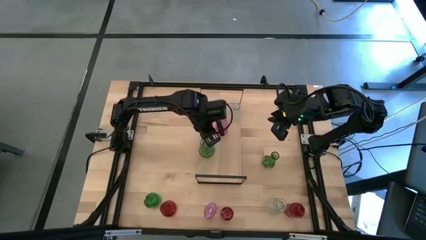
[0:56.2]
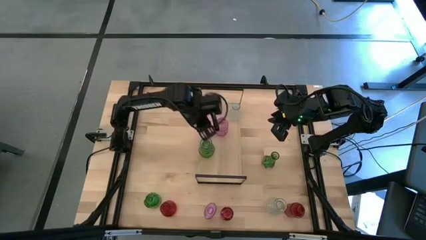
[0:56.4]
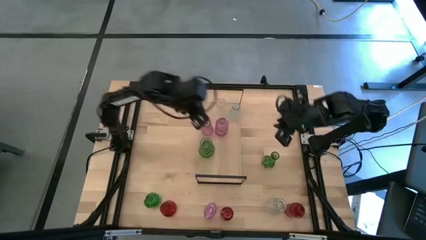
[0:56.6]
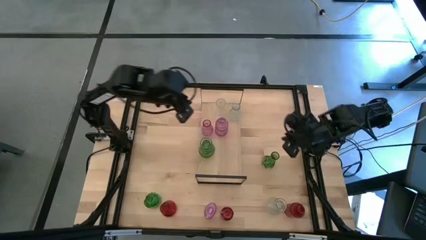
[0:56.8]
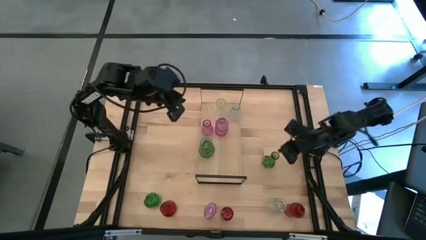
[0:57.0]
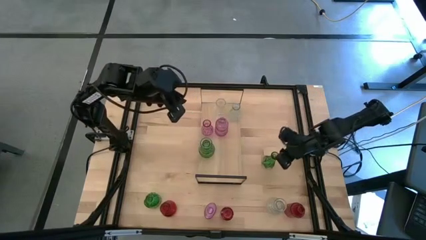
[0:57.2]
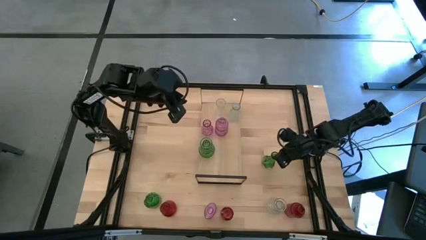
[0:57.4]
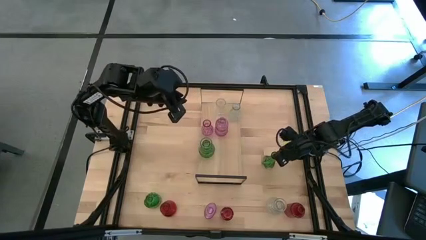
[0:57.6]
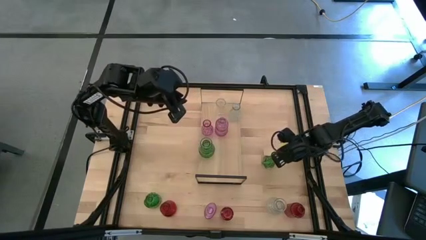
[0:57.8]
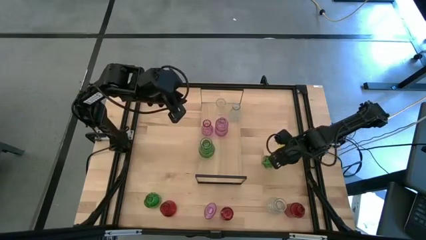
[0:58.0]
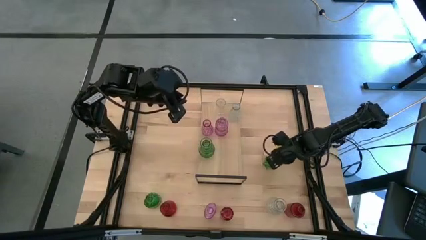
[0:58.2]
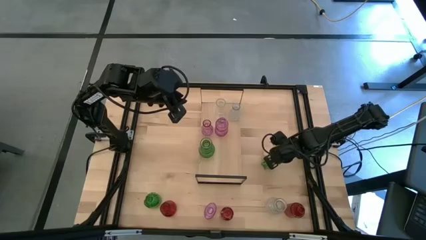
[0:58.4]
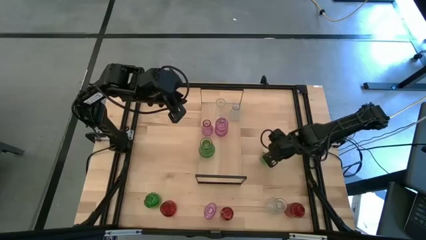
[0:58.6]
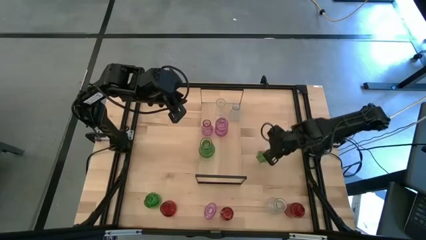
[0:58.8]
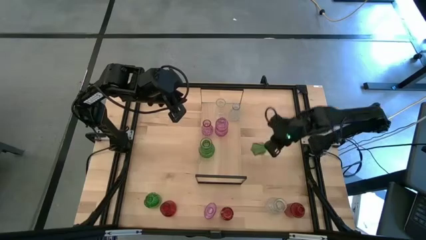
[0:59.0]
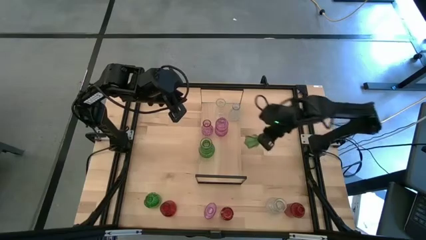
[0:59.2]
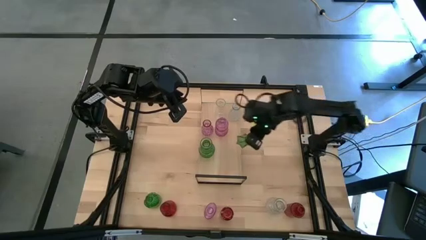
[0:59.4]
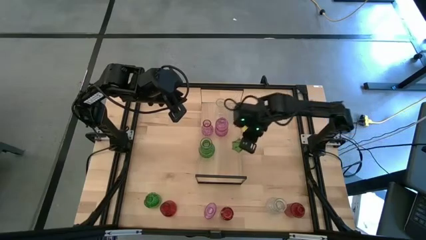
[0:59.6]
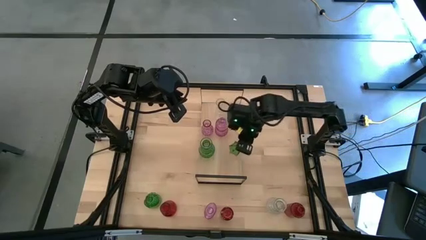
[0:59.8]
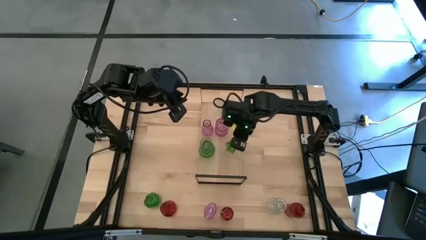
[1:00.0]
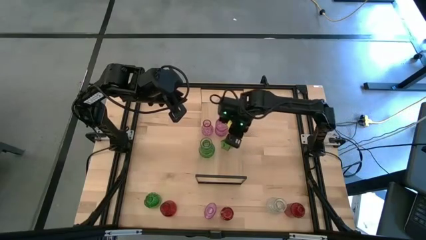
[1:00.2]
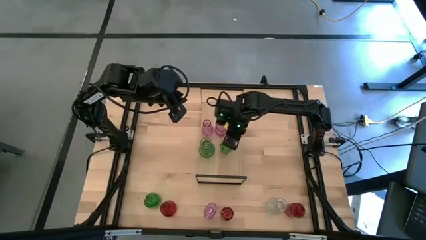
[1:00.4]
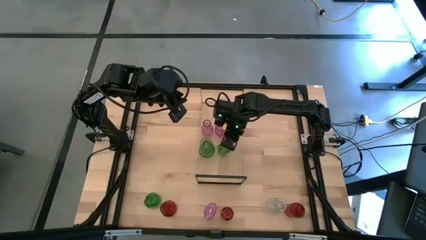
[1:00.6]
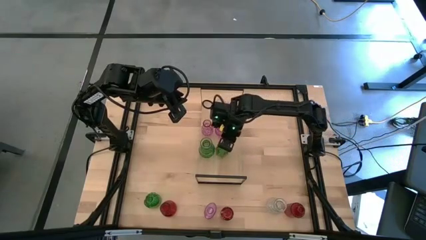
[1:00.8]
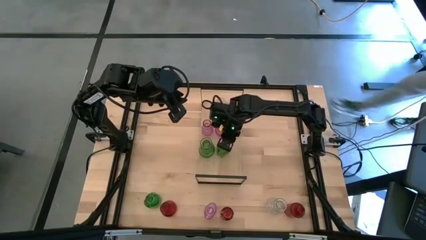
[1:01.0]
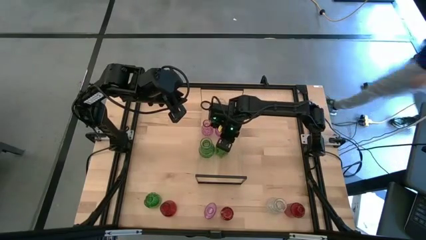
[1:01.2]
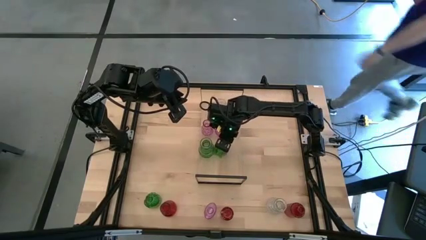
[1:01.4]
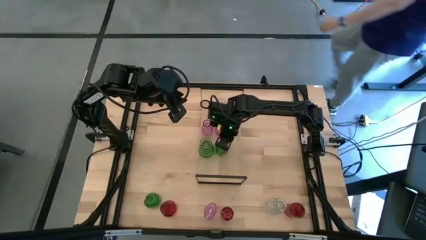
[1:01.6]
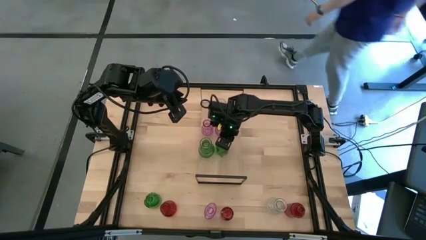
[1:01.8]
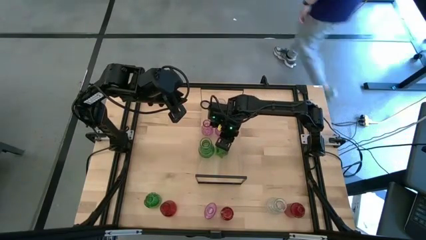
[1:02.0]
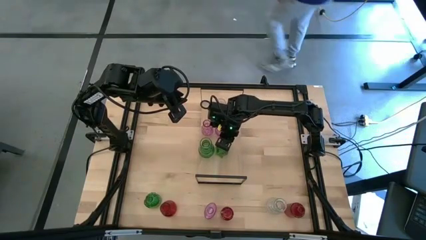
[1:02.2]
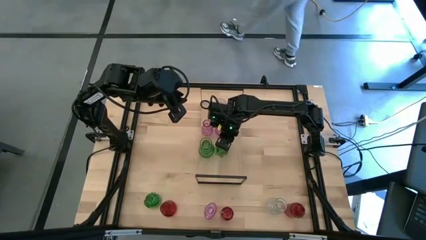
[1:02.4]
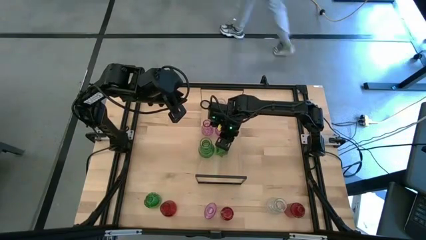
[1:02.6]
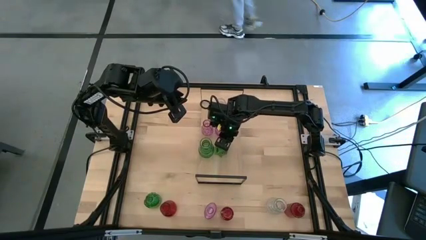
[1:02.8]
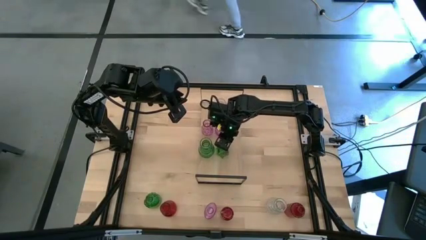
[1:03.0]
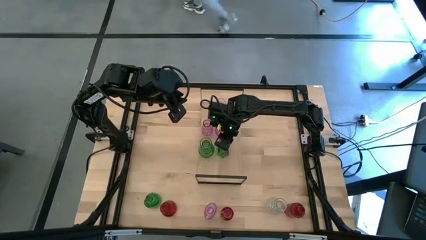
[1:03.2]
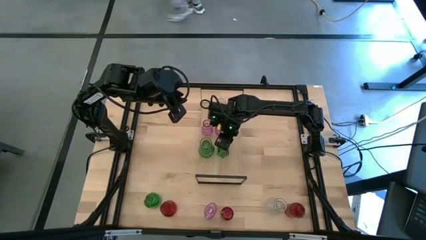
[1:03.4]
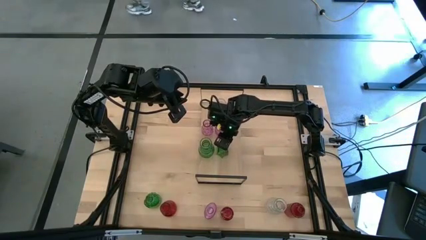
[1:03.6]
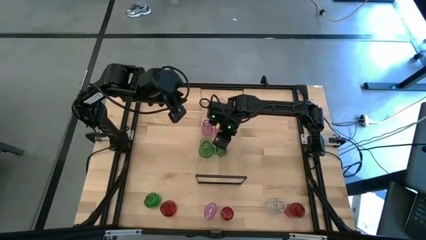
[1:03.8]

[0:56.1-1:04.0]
Task: sort vases onto shelf
Put the right green vase on the shelf aligned with the other green vase

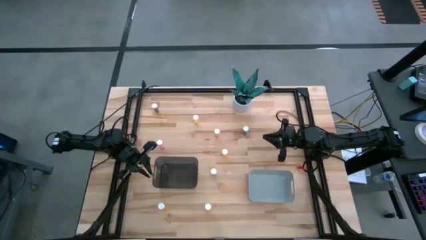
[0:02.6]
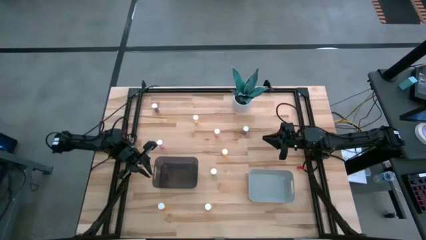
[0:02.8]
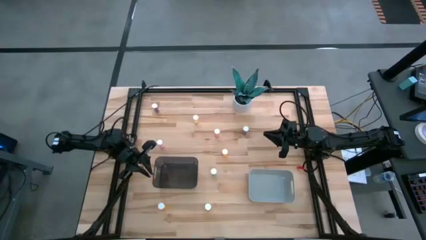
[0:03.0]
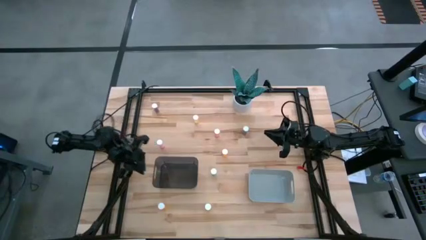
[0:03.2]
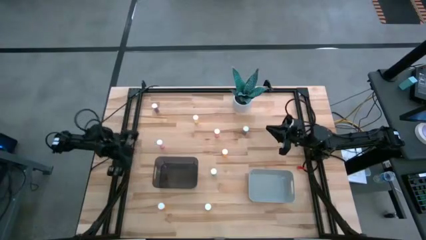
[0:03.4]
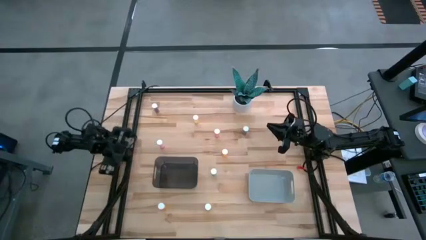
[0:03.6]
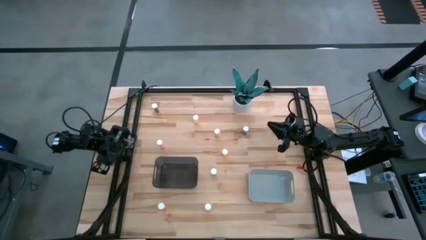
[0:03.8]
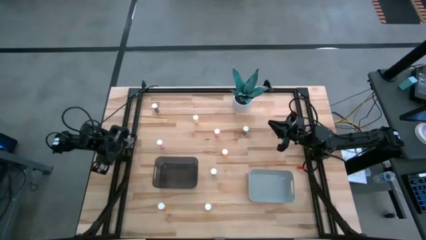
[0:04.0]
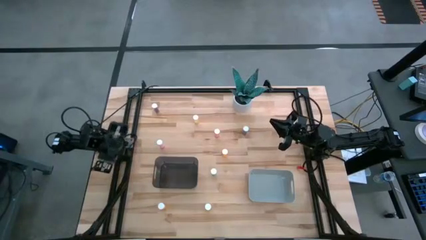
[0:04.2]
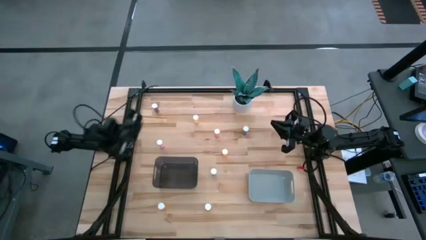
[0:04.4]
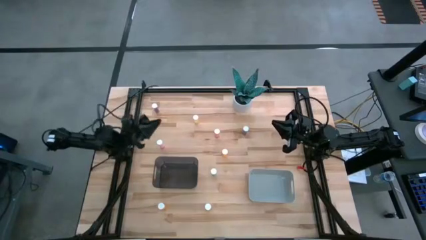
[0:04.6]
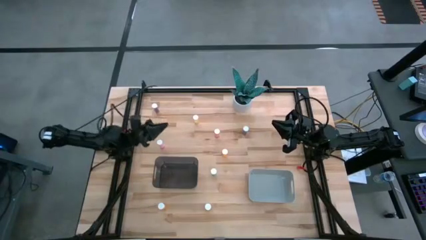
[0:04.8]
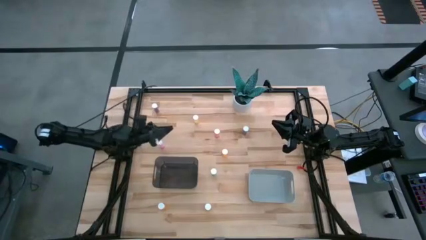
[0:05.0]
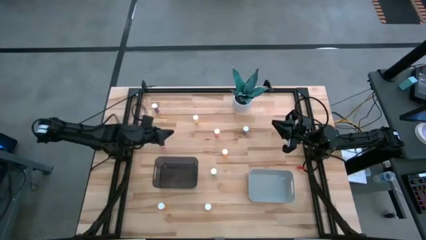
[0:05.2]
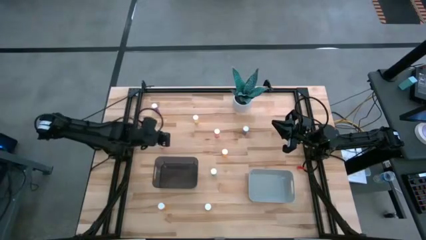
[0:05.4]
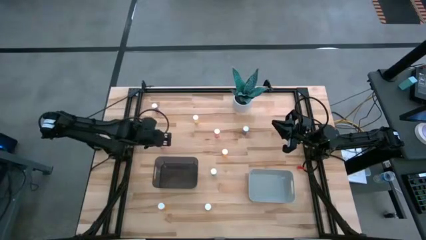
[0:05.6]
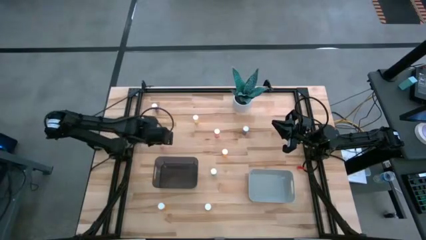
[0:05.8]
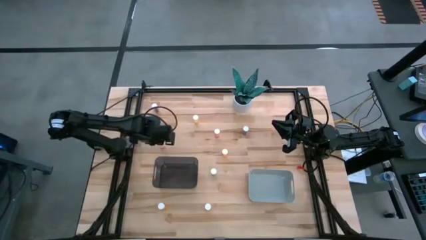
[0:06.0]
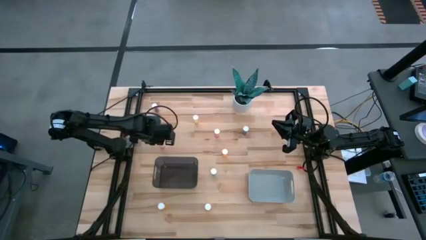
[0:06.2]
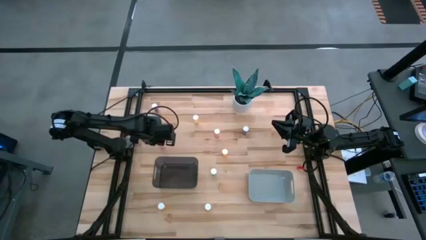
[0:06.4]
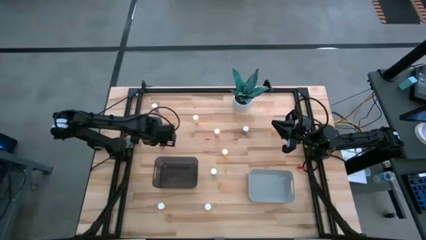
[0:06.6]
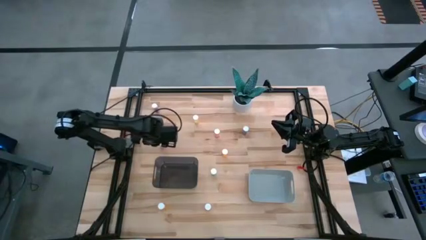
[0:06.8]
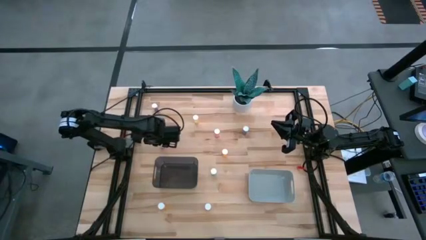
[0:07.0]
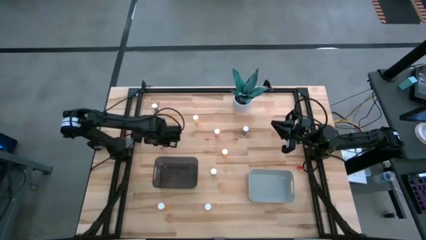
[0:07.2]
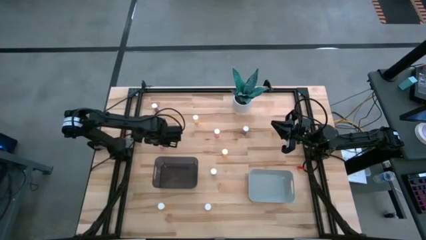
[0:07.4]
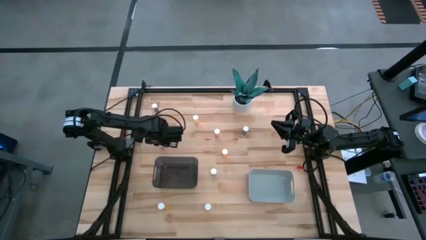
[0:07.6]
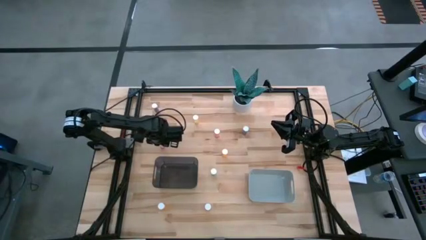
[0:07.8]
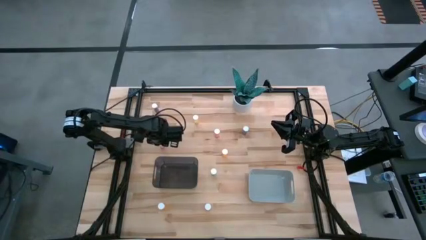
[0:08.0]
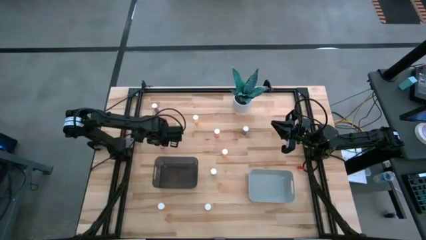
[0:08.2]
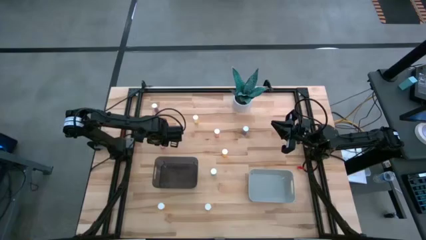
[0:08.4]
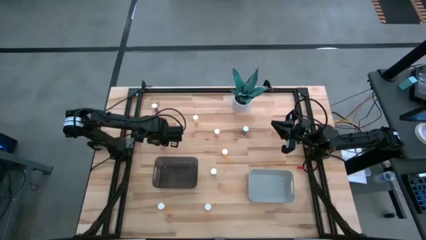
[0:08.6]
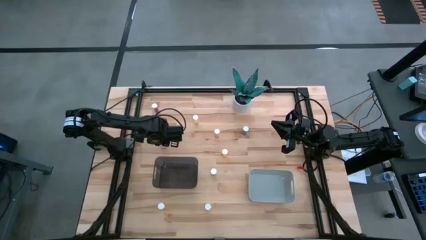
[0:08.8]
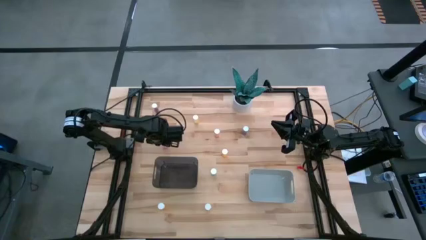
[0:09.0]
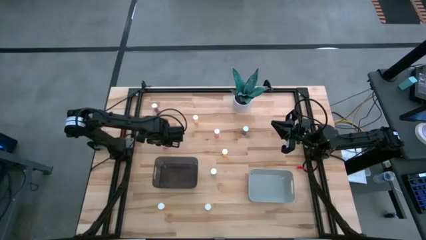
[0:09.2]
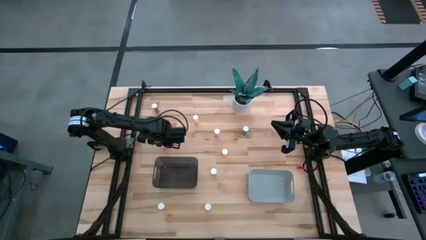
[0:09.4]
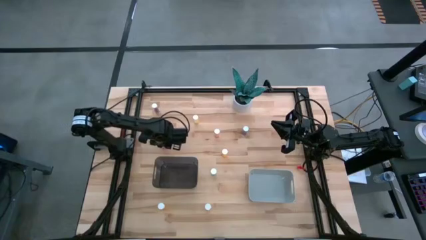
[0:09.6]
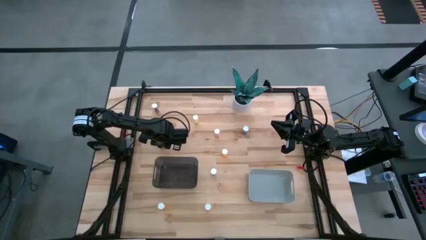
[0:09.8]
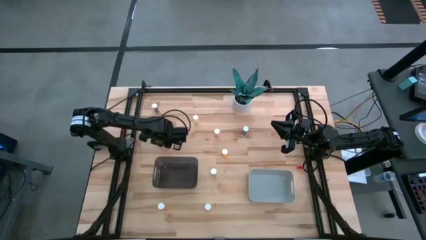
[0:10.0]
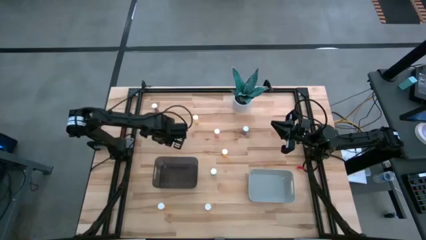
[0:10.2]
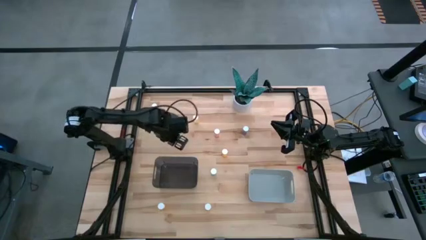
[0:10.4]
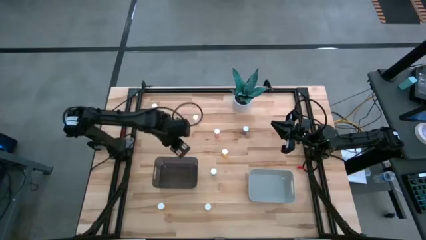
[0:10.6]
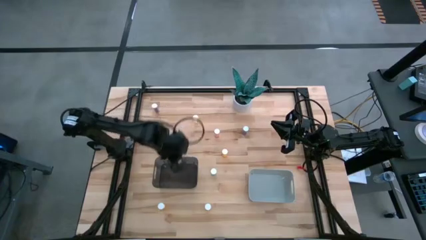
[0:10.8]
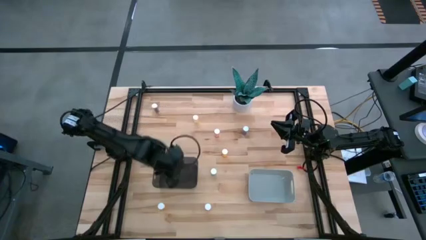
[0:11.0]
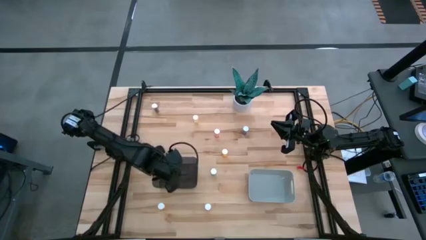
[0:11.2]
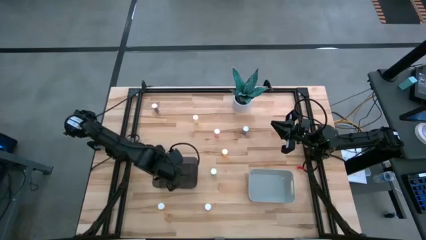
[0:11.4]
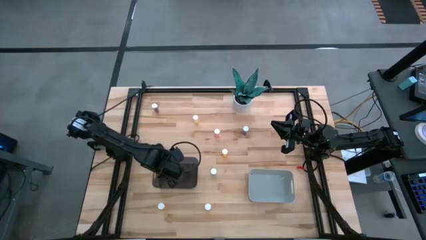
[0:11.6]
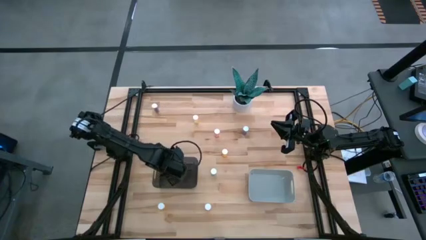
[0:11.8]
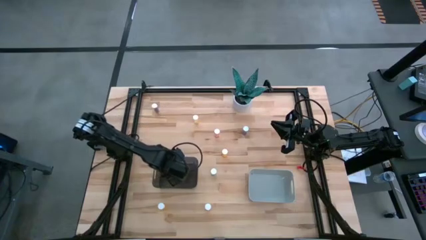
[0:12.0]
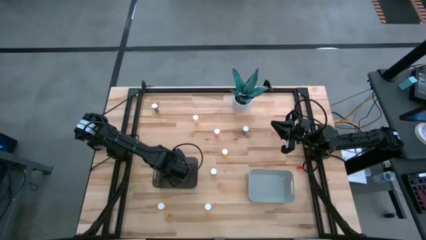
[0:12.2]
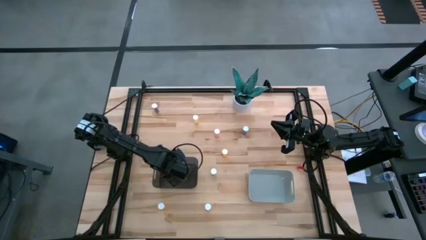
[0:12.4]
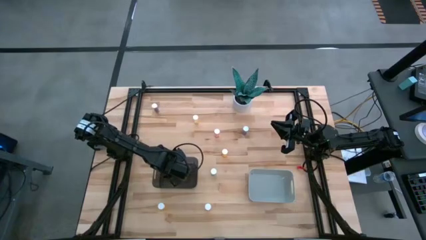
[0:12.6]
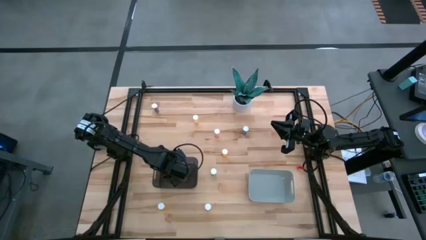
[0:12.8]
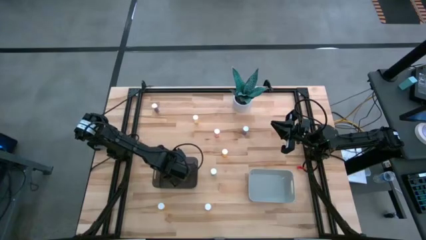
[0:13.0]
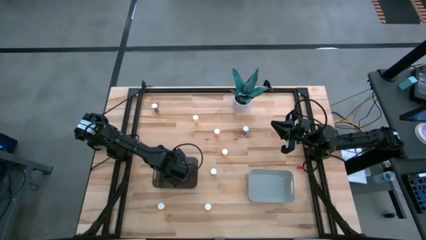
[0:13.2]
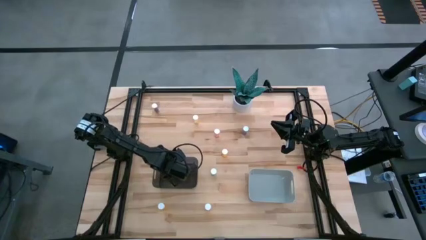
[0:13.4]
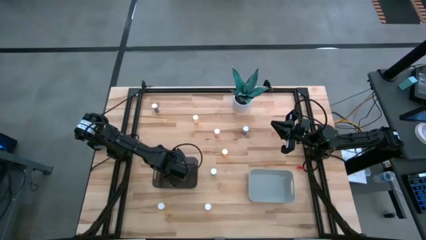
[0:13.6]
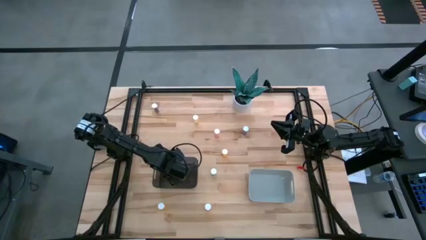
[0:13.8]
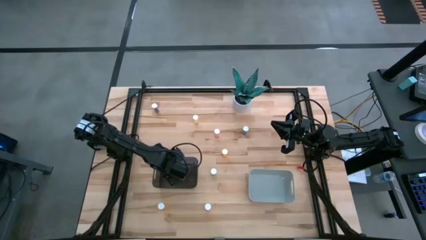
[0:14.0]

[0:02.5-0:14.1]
Task: Pick and place medicine bottles into bin by pill shape (circle, oval)
Put the left pink tablet bottle into the black bin
